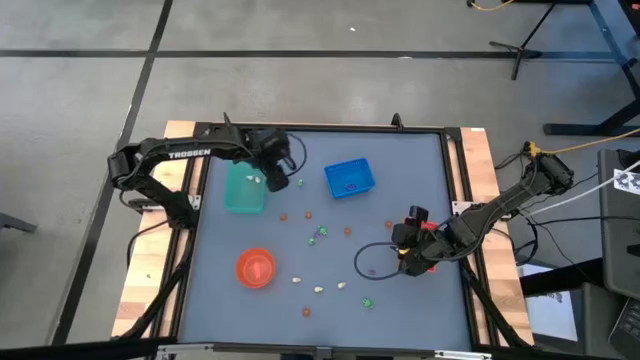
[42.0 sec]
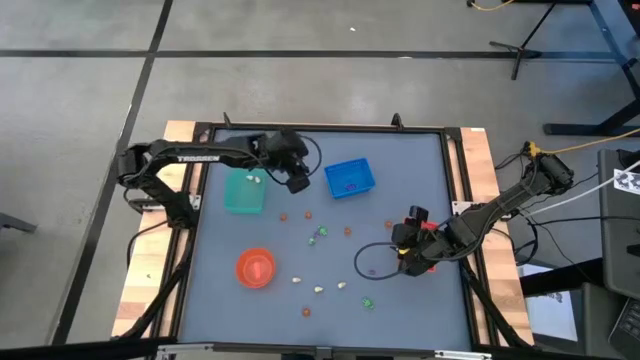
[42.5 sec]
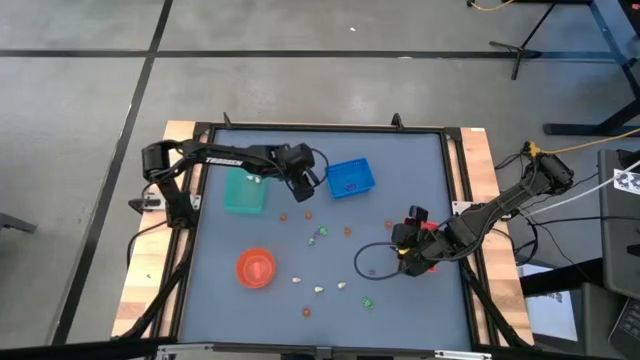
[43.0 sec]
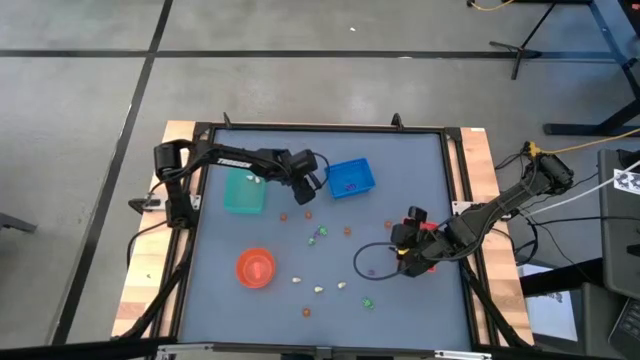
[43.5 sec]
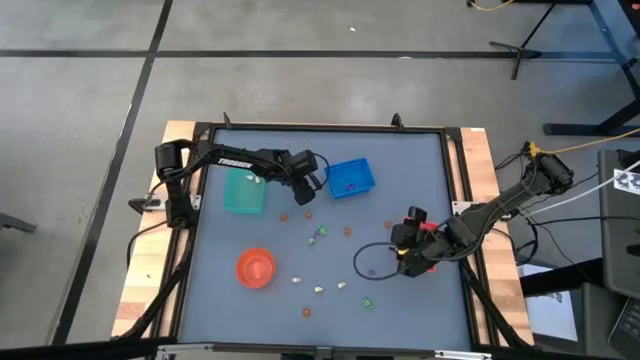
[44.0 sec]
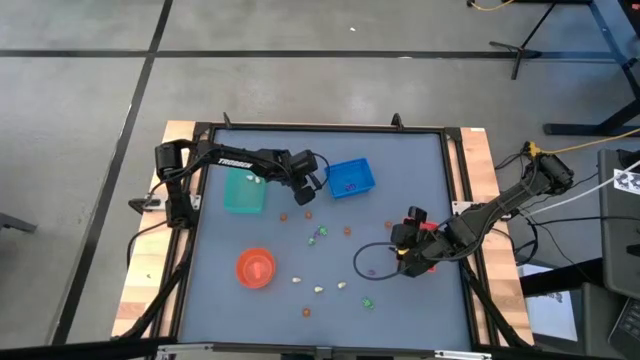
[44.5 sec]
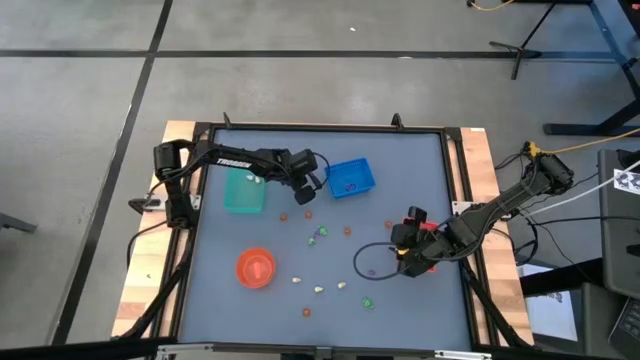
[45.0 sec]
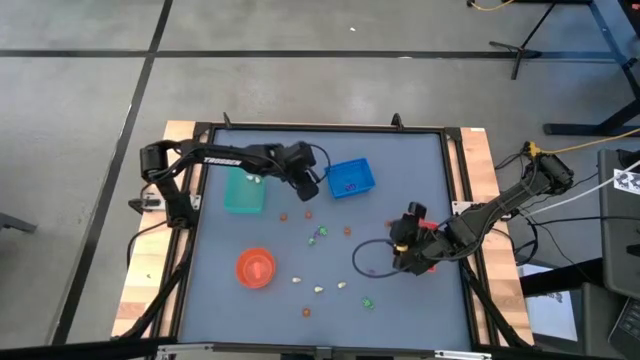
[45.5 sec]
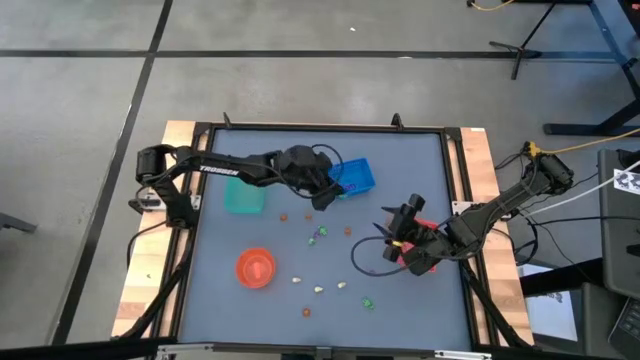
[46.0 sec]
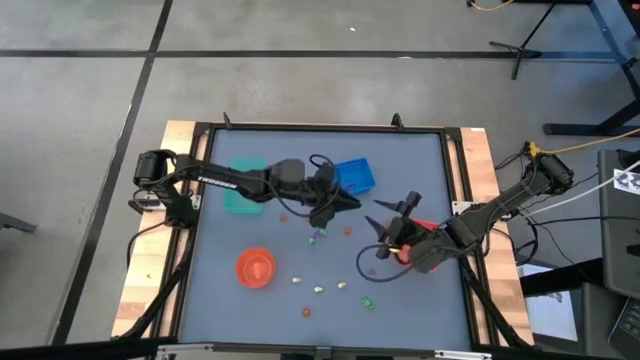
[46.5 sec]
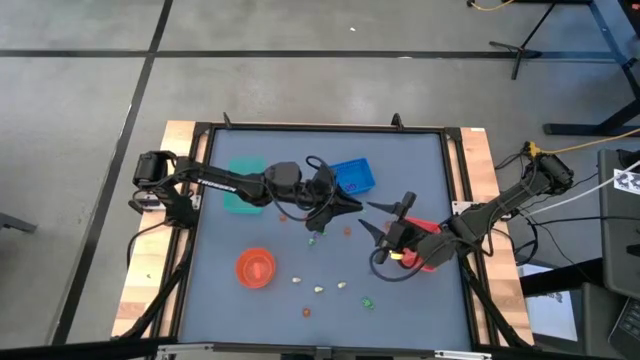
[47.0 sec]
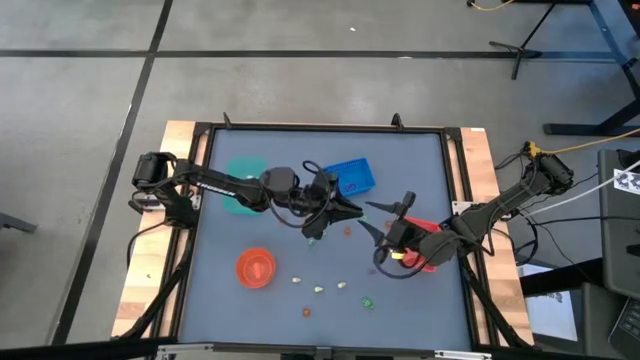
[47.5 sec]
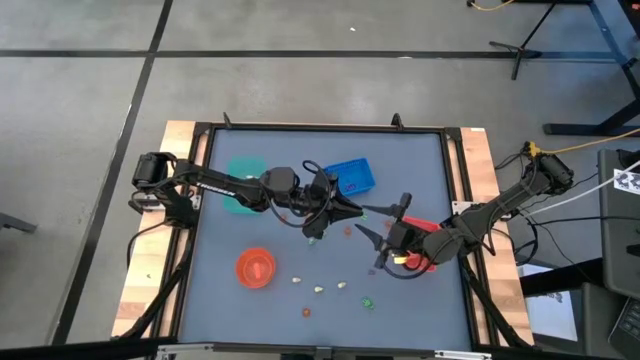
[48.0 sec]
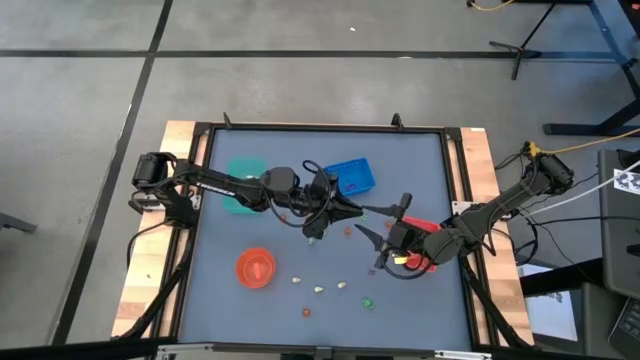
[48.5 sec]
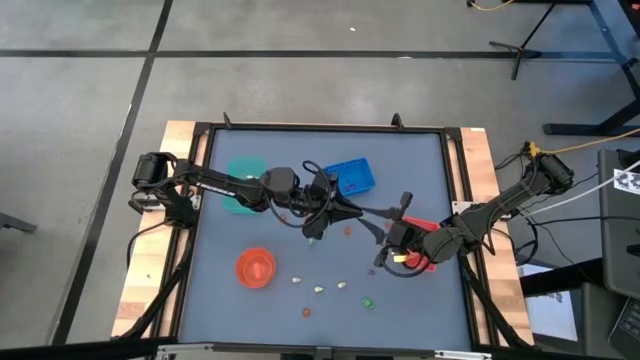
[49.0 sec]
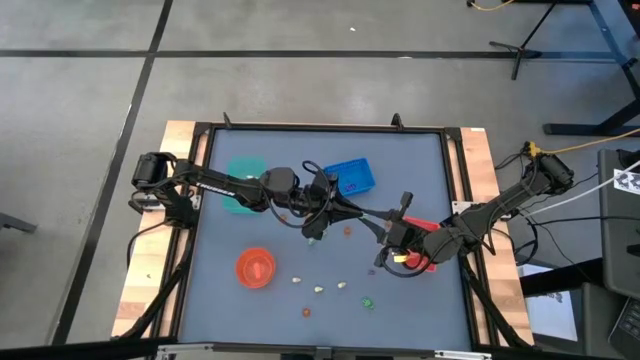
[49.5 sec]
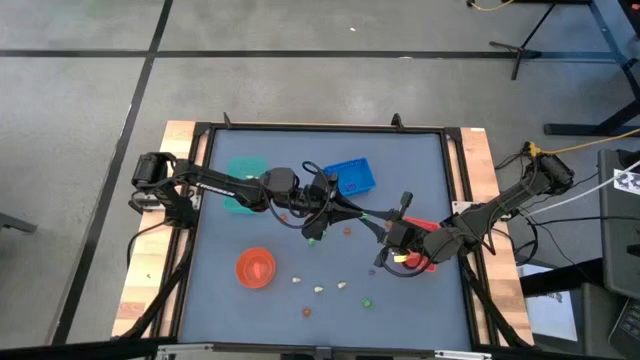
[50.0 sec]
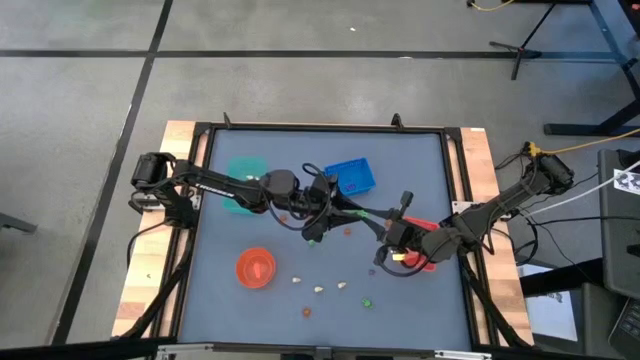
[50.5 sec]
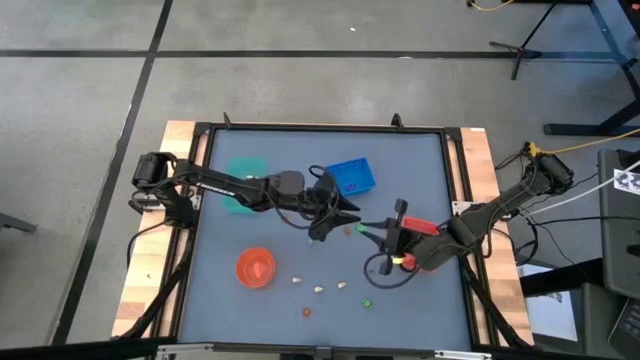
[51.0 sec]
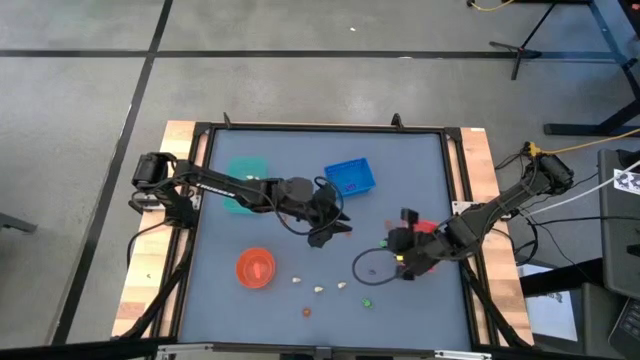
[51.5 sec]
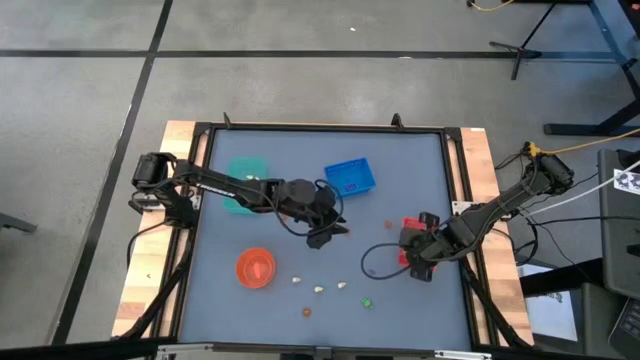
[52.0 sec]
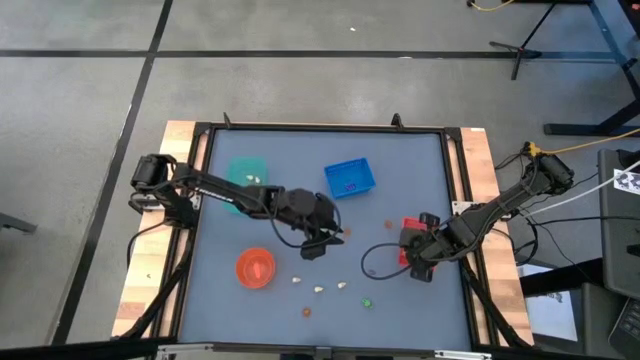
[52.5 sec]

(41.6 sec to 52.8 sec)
Task: Sort Halloween decoration
Put the green skeleton toy into the orange bin

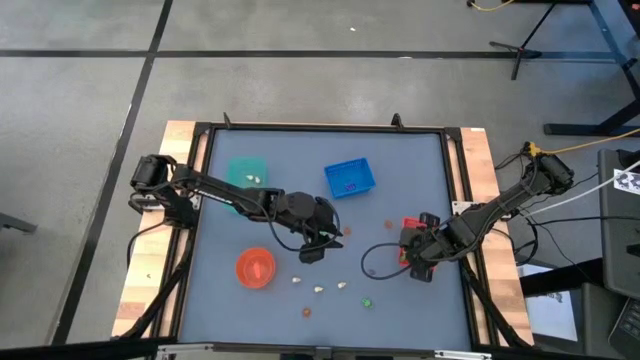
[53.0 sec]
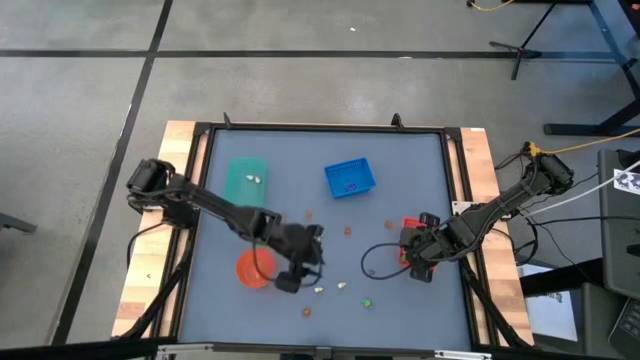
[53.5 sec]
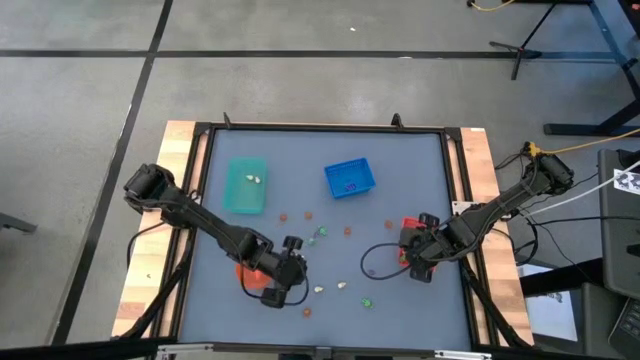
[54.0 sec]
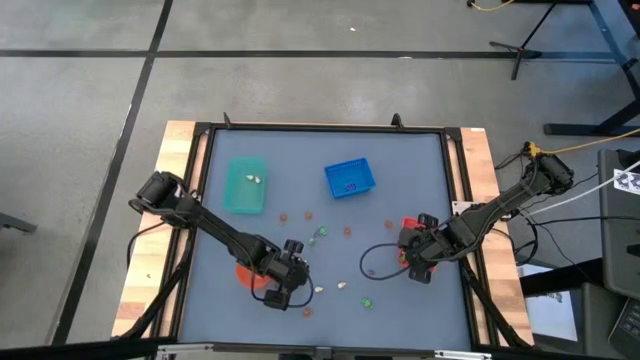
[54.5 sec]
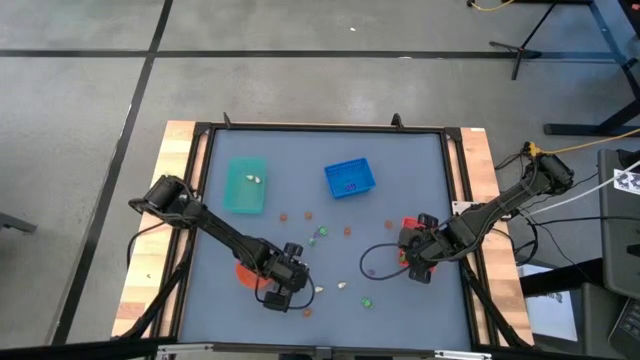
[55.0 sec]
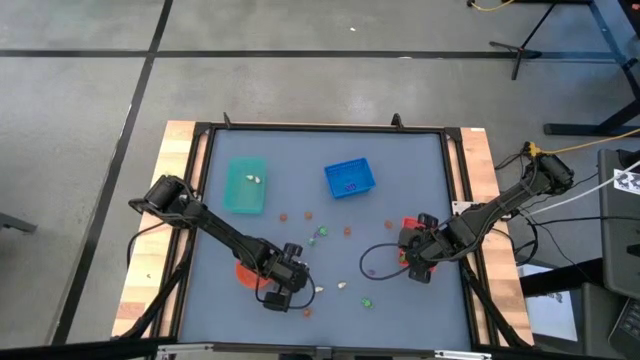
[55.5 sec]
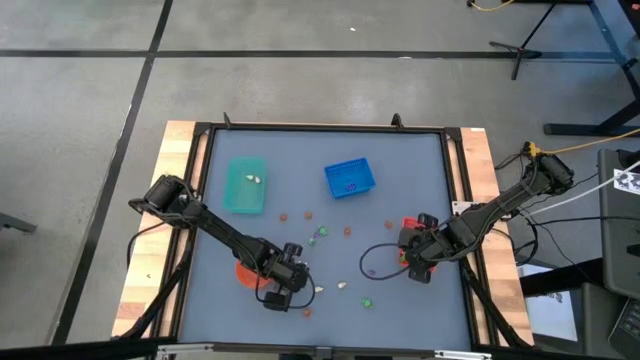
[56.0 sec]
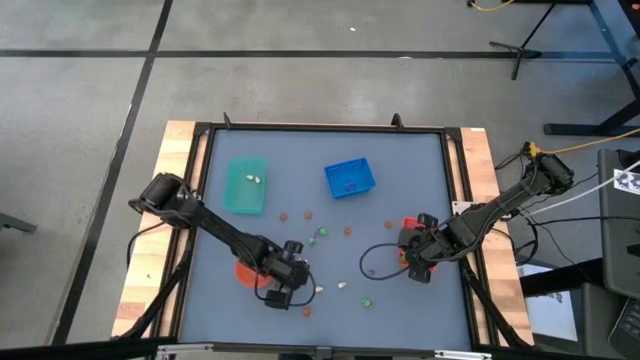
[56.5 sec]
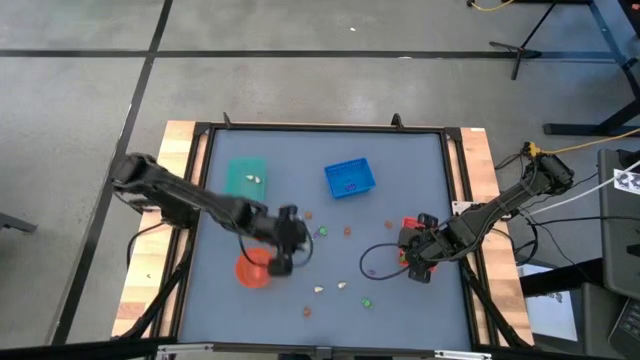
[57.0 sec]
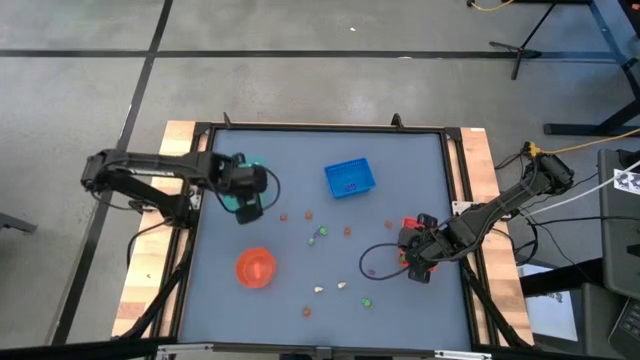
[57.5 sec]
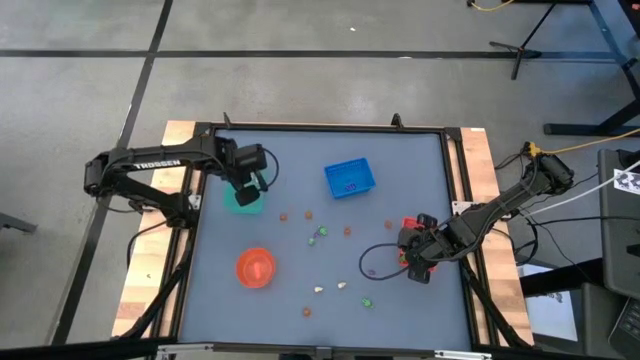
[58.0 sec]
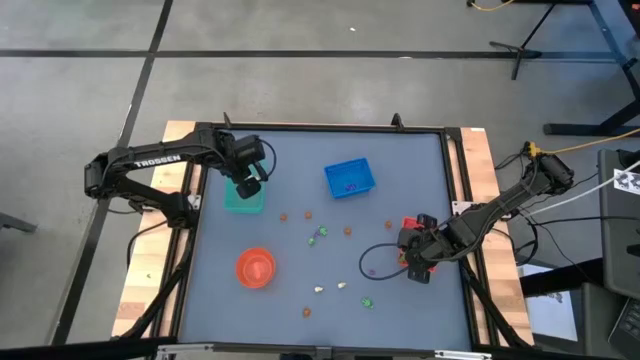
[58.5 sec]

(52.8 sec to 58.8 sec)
Put the white skull toy into the green bin

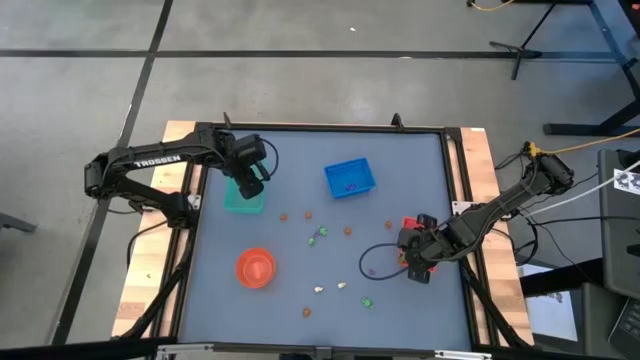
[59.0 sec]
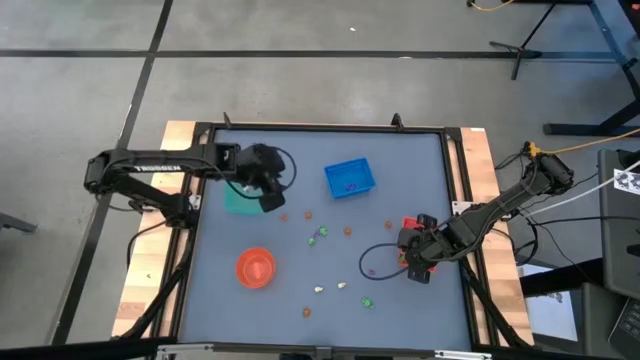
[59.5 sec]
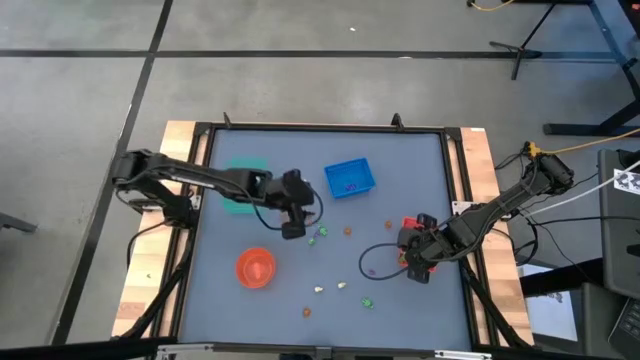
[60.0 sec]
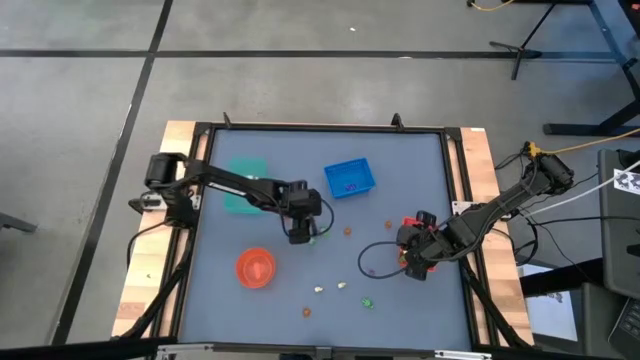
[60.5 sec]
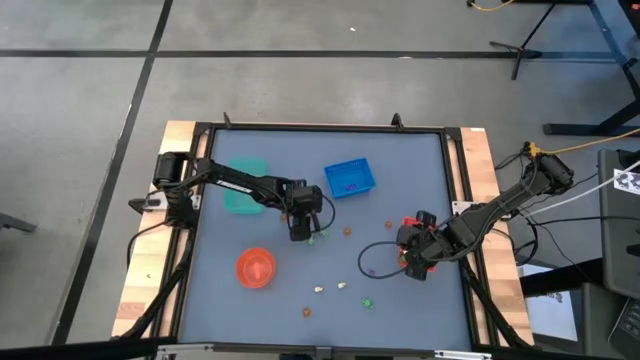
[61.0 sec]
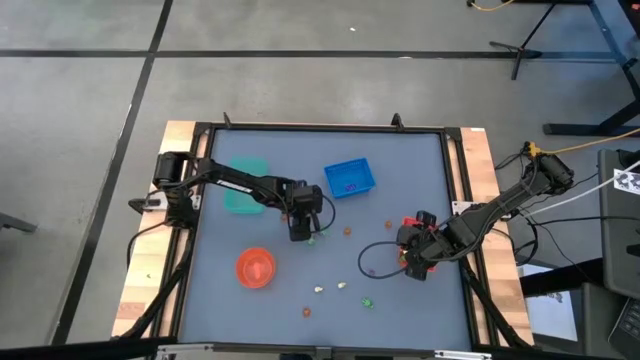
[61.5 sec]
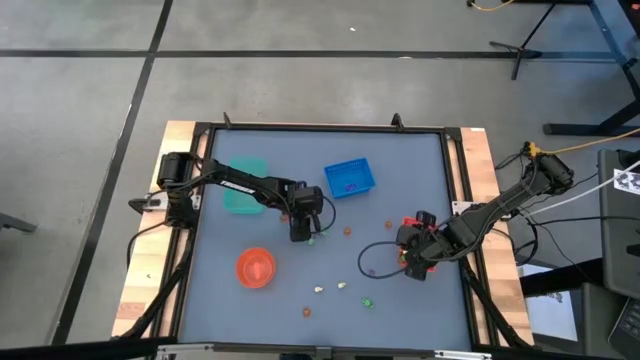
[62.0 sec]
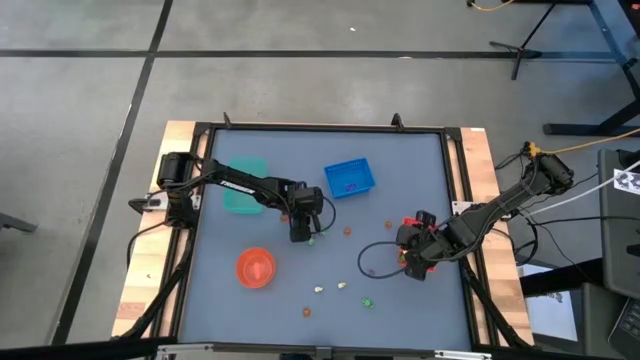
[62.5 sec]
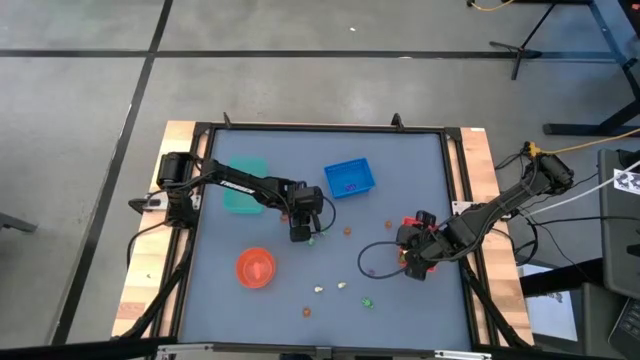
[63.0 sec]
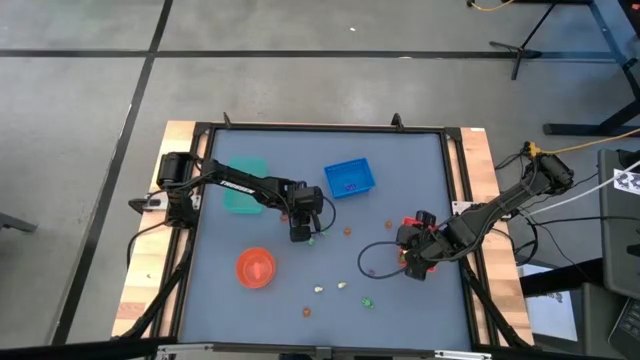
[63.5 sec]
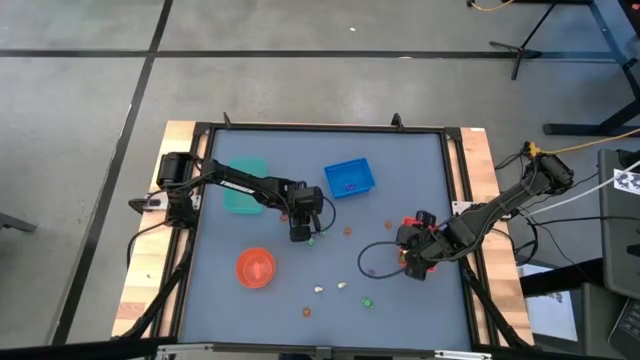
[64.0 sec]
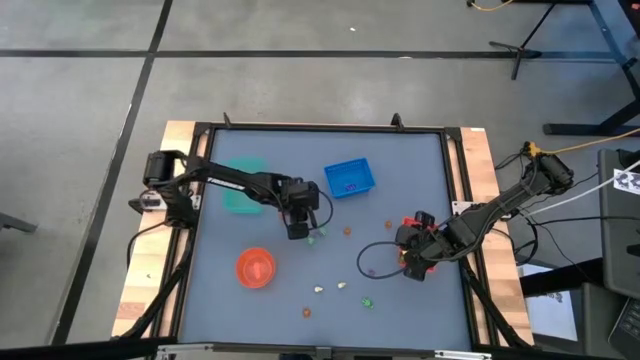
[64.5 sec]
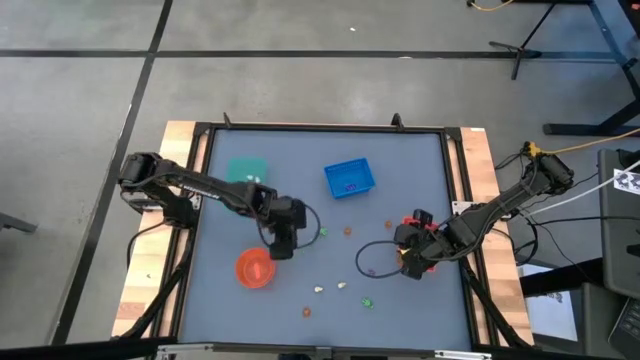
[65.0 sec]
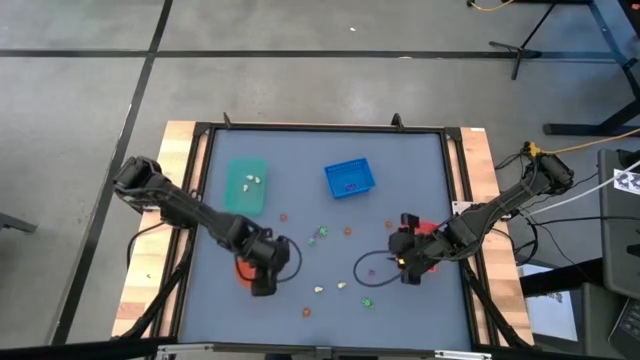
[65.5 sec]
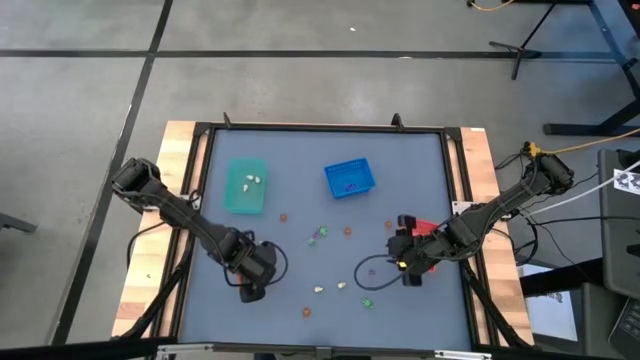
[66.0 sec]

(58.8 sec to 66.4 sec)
Put the orange pumpkin toy into the orange bowl
